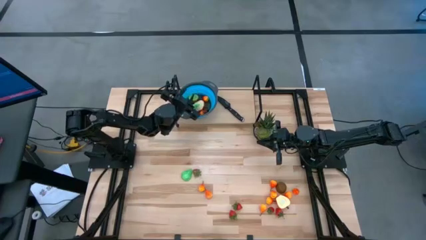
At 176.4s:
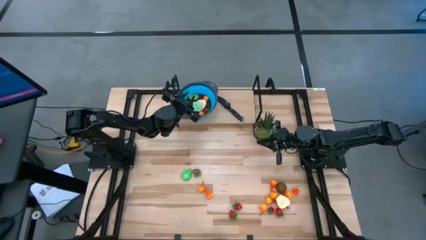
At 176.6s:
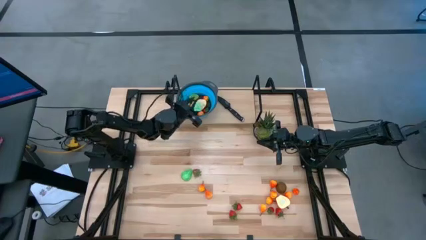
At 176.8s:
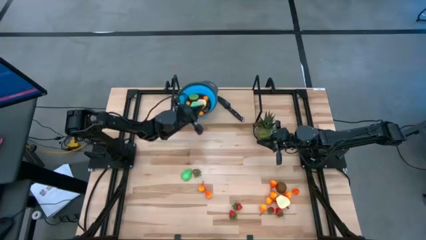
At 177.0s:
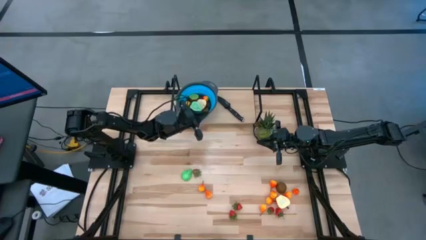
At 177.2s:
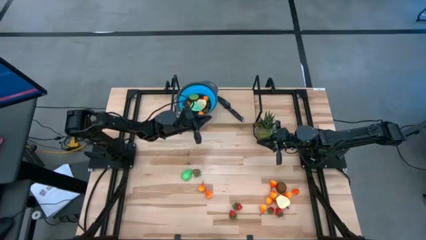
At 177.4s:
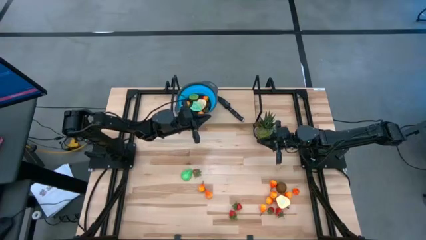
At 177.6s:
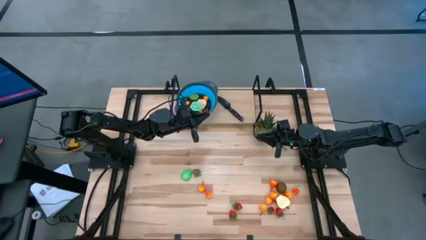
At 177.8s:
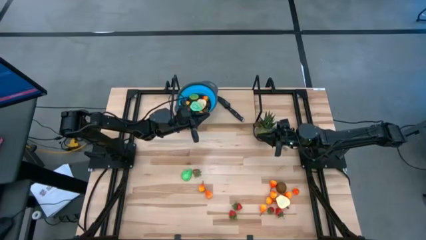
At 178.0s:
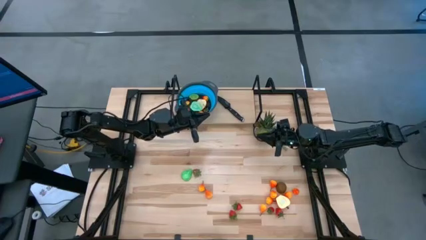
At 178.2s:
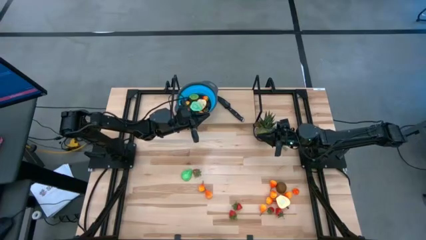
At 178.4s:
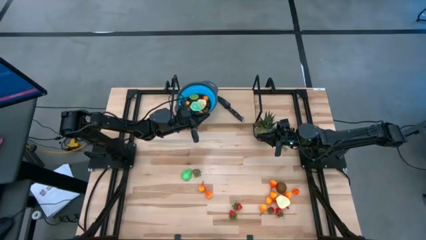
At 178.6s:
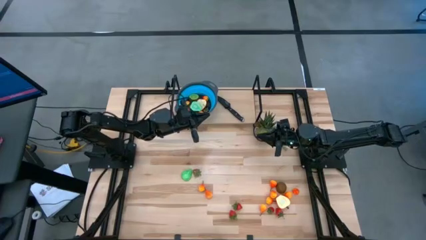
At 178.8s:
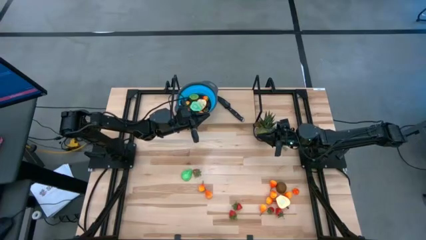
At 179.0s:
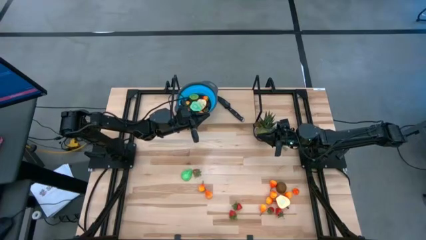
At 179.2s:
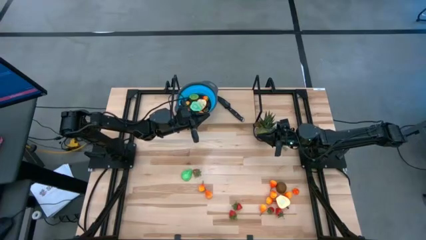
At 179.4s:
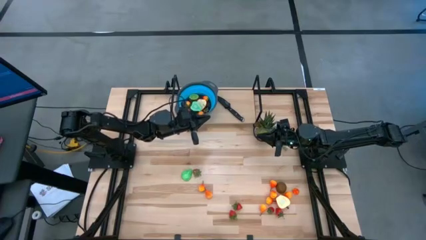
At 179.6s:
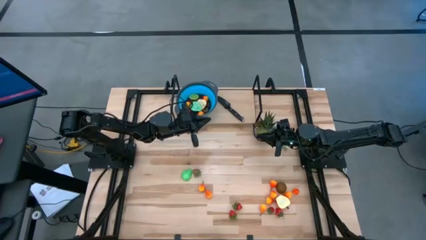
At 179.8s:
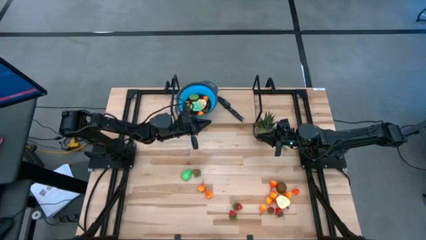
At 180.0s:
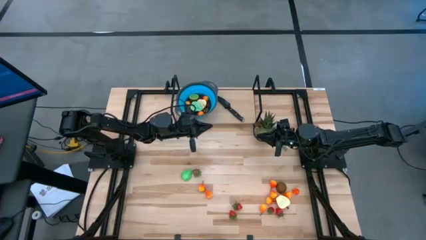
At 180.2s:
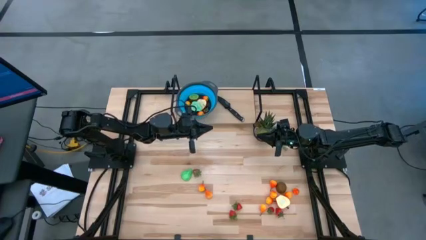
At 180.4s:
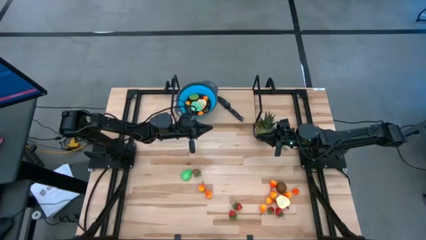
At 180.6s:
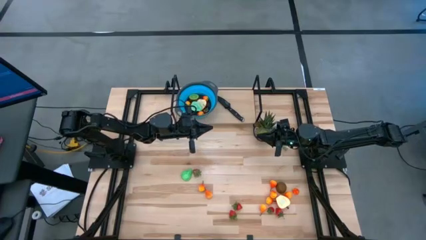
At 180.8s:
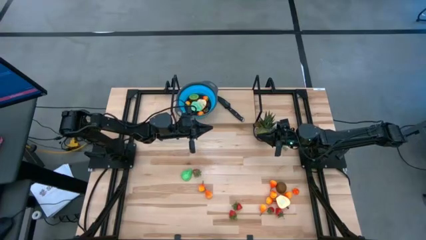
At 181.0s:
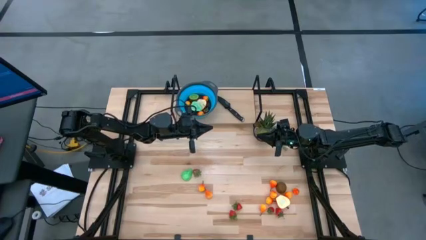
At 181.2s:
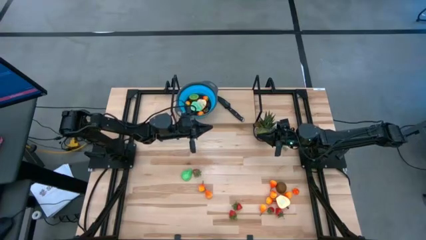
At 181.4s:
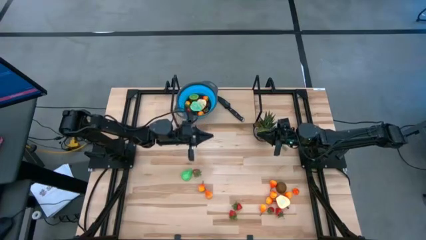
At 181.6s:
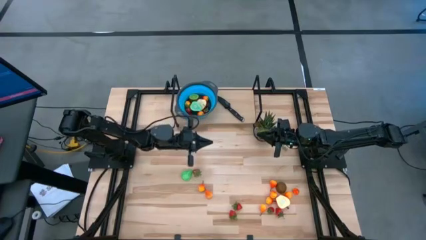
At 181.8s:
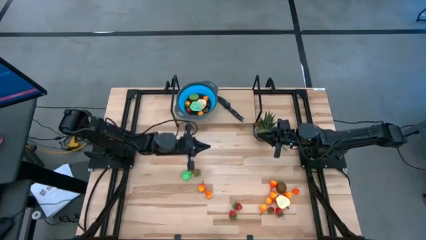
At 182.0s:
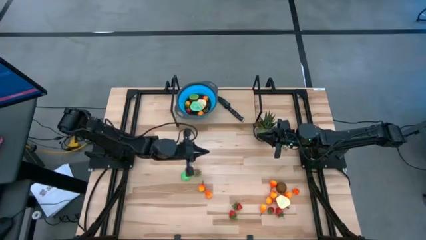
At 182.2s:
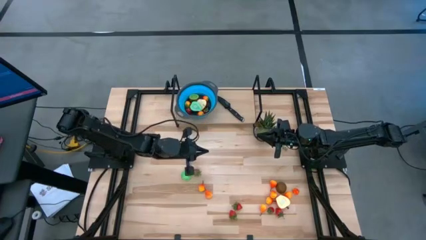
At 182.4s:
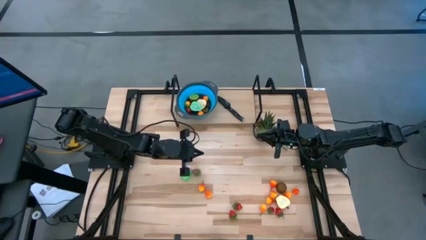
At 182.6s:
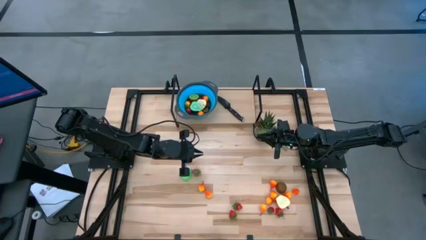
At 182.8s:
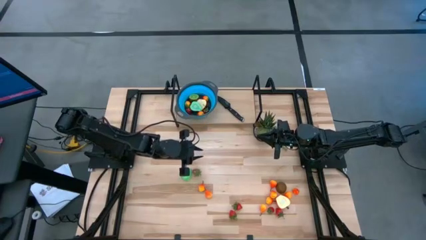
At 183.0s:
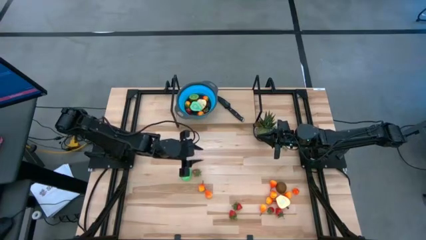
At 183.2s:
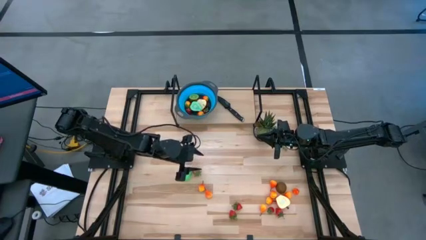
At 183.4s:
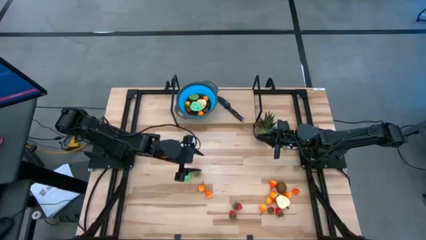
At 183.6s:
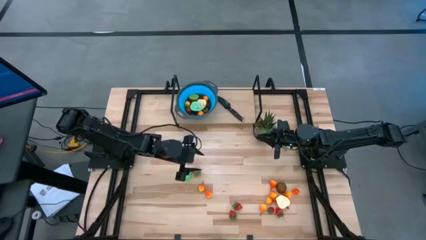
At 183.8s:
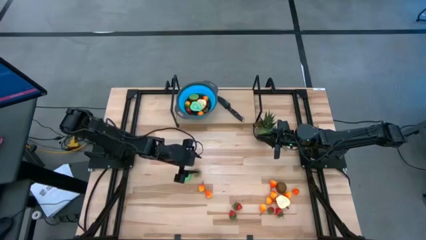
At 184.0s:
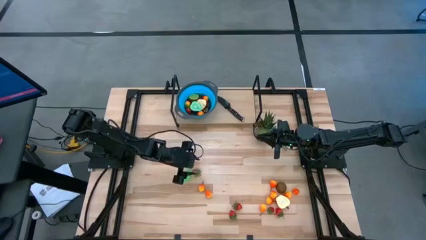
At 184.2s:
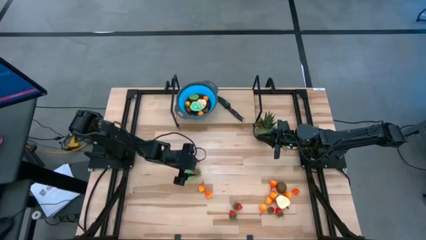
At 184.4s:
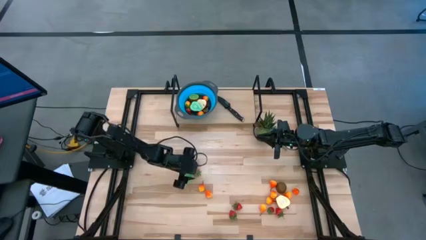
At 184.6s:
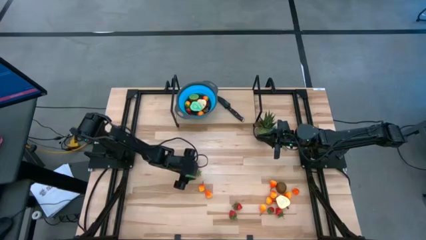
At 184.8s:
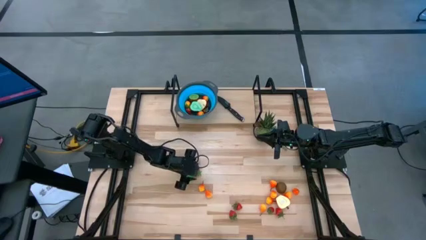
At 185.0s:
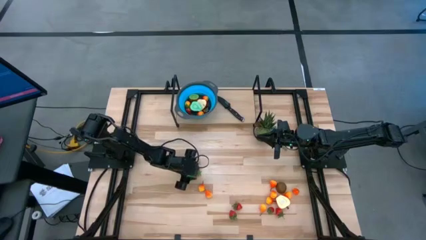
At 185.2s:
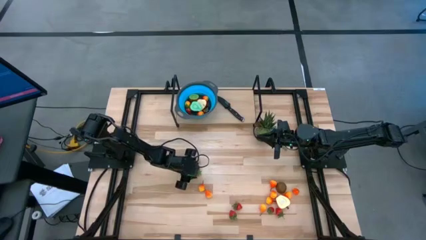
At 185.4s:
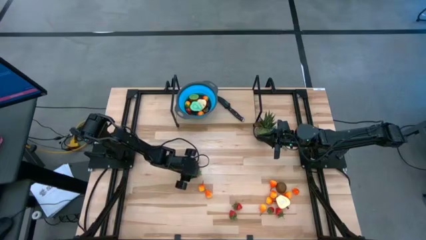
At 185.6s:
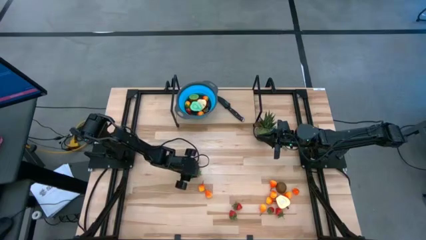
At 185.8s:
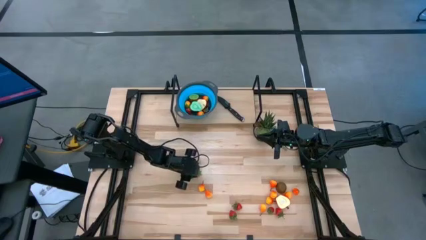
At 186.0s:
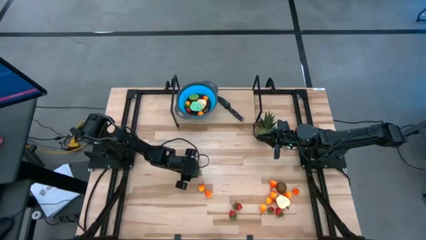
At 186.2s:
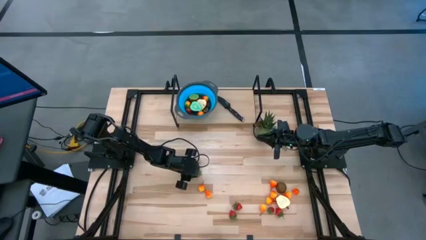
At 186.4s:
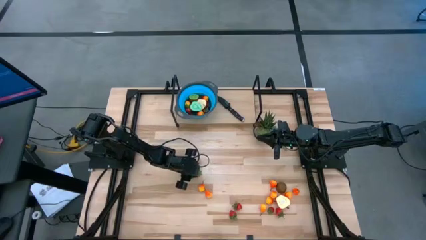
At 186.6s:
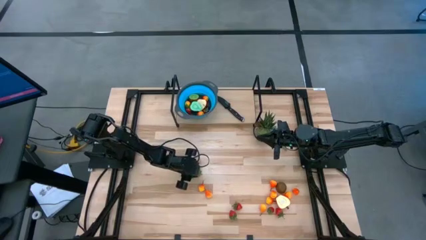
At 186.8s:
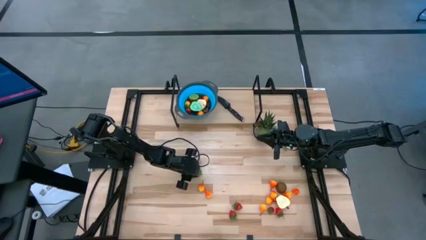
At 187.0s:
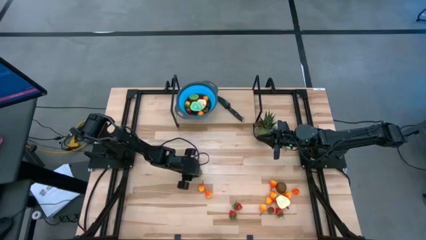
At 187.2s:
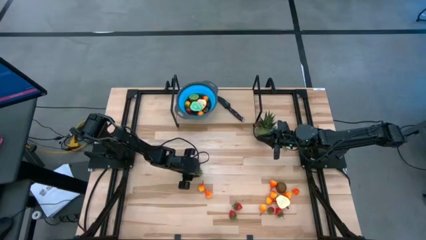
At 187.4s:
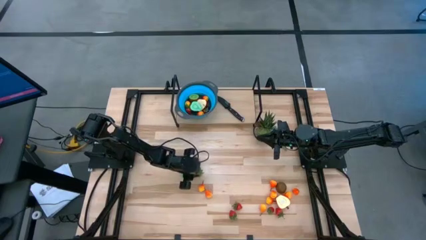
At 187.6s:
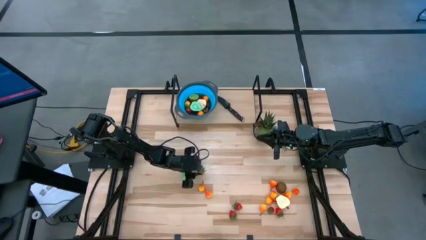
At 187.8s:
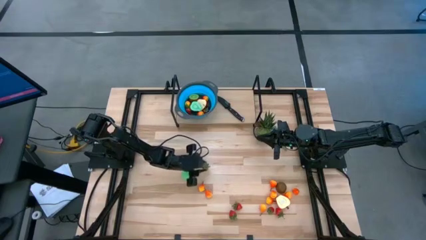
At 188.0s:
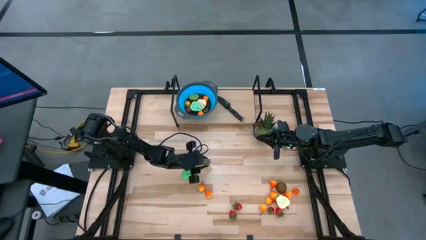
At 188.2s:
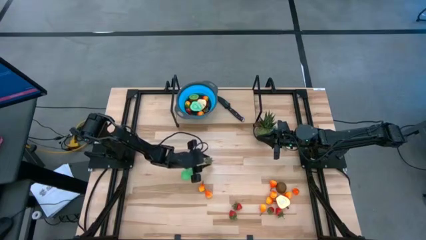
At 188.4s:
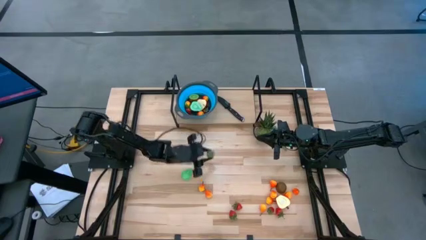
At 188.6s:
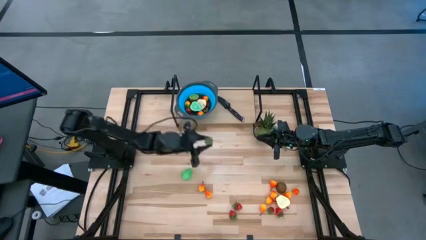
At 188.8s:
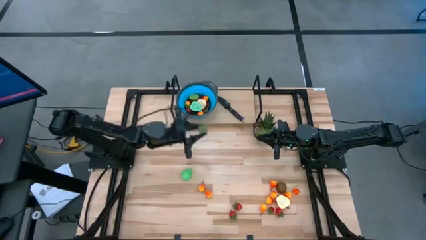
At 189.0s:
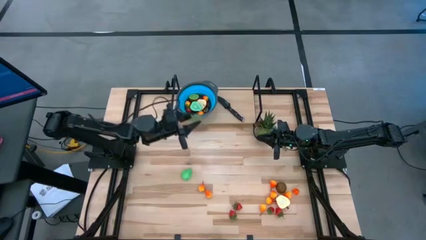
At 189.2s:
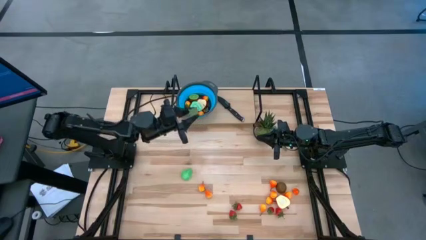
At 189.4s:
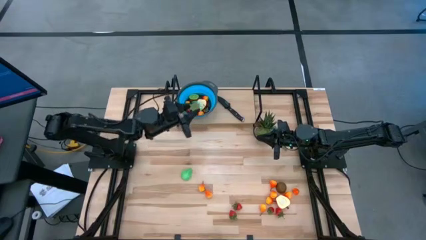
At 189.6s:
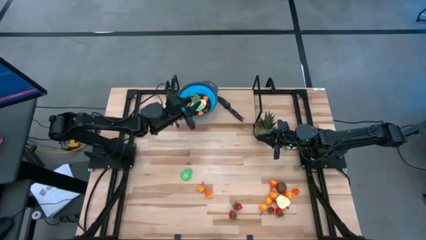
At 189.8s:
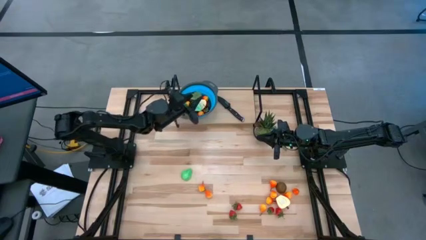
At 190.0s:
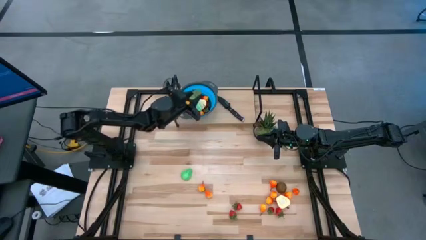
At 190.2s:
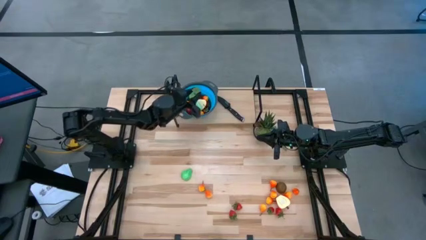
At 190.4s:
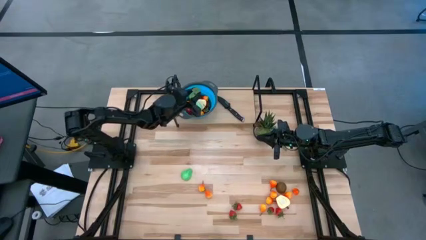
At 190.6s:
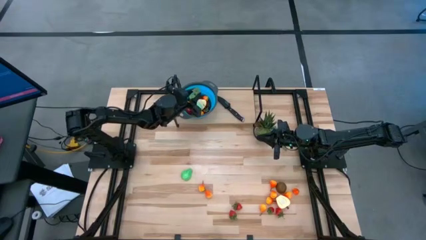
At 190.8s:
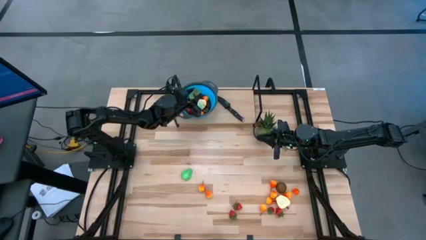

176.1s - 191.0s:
Task: Pick & Place Fruit
Put the strawberry into the basket

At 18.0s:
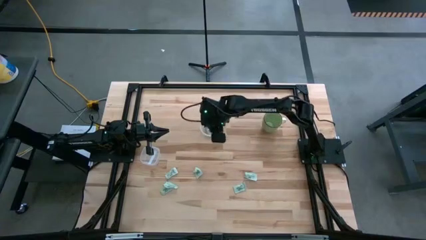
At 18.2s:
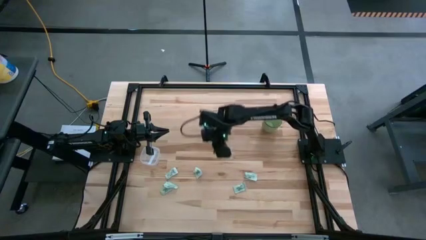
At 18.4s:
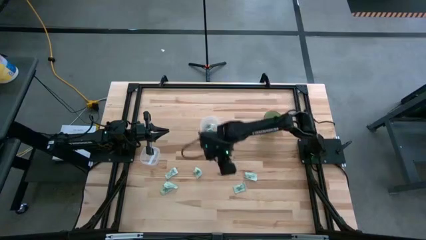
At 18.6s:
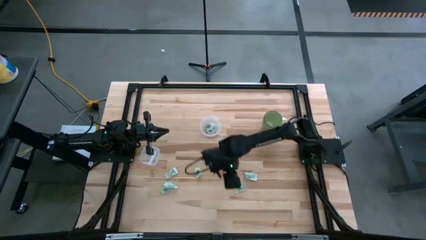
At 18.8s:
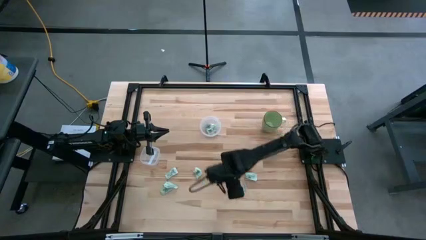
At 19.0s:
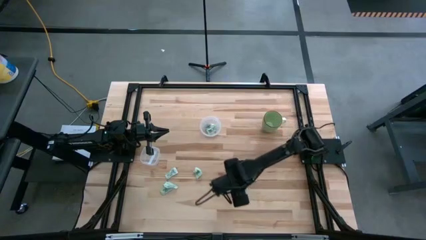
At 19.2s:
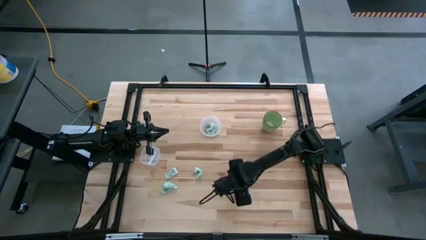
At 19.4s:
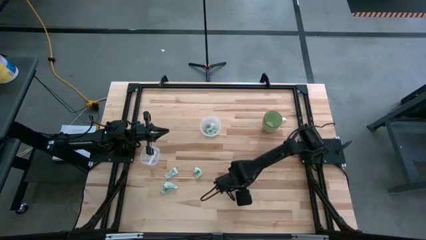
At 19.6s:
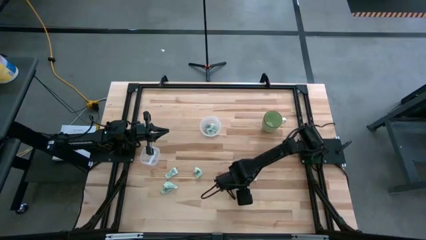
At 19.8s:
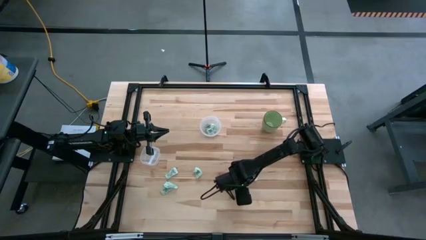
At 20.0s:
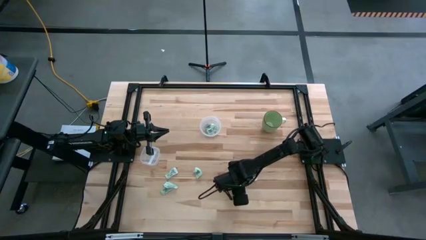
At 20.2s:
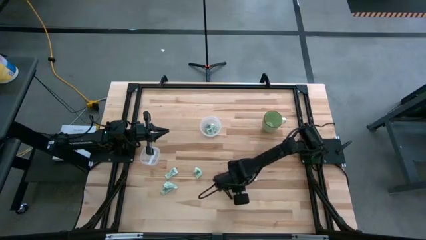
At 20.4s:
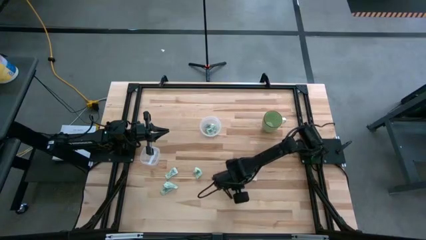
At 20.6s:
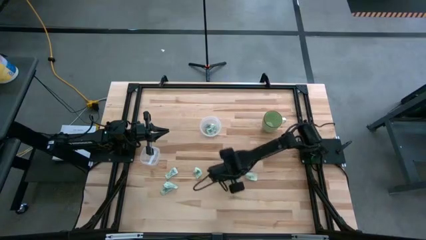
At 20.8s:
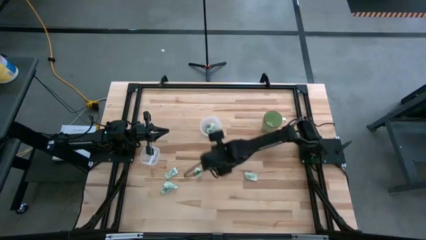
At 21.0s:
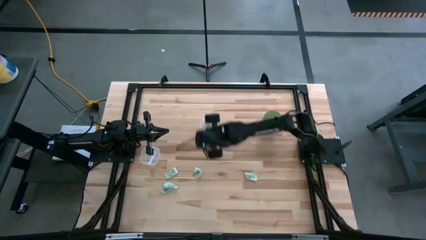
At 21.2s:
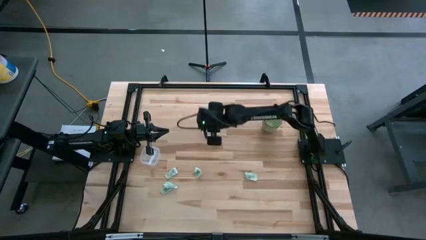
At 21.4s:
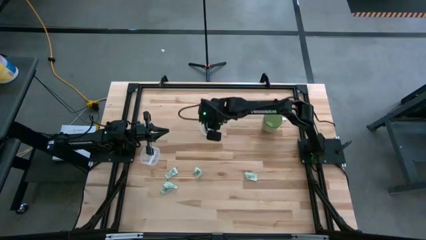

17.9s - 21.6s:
Task: Pick and place Stevia / Truvia into bins
Put the stevia packet into the right transparent container
